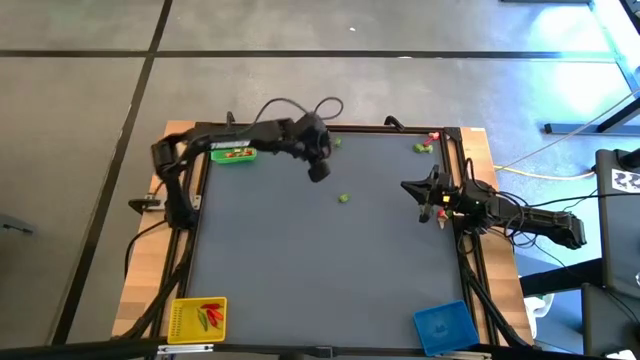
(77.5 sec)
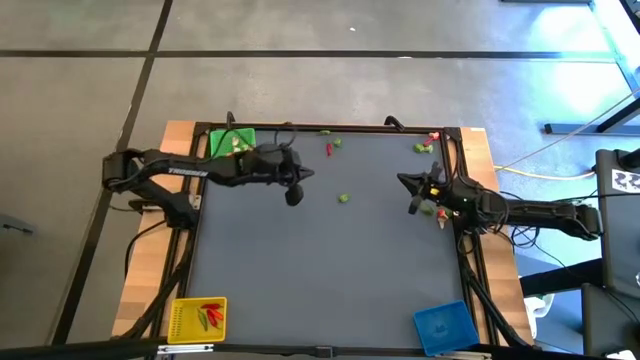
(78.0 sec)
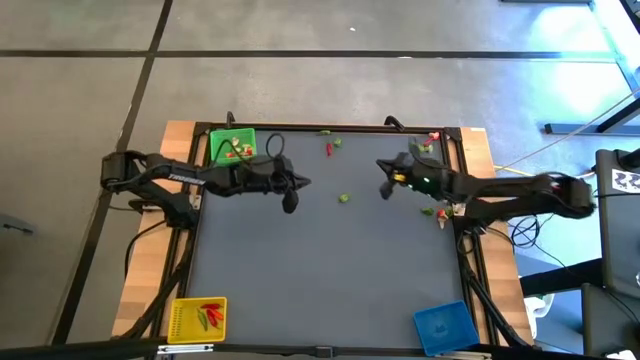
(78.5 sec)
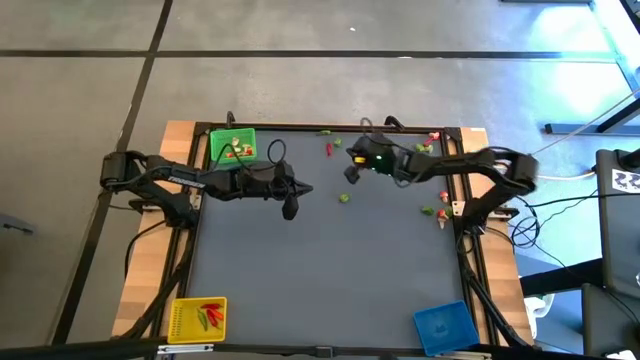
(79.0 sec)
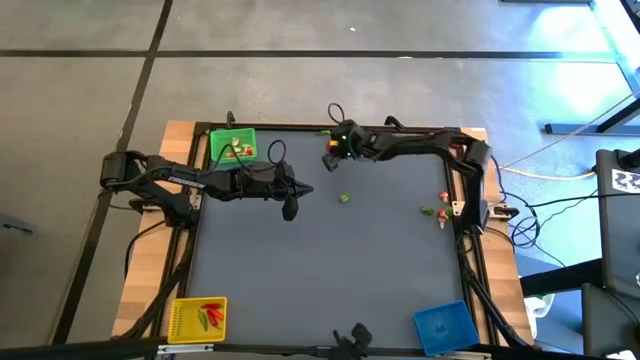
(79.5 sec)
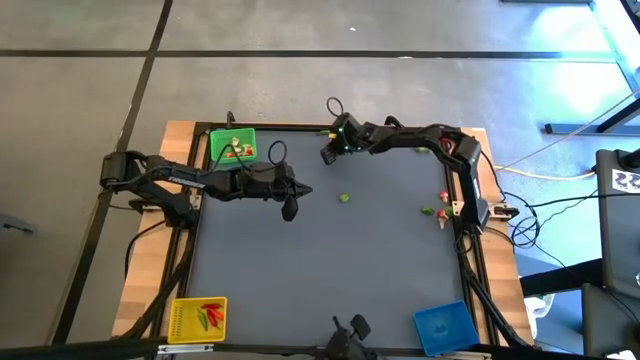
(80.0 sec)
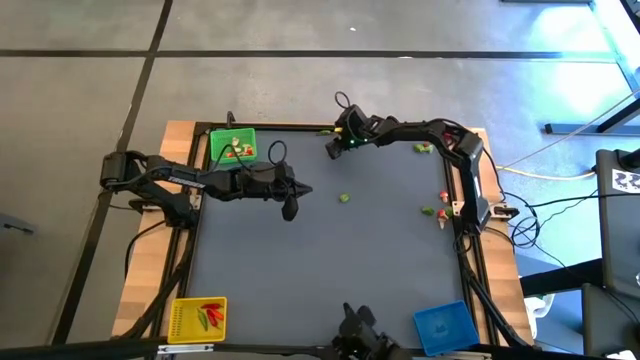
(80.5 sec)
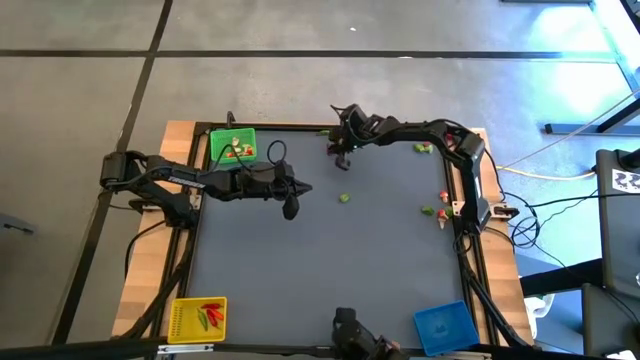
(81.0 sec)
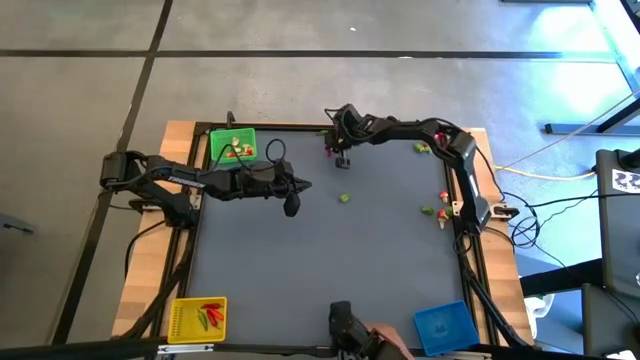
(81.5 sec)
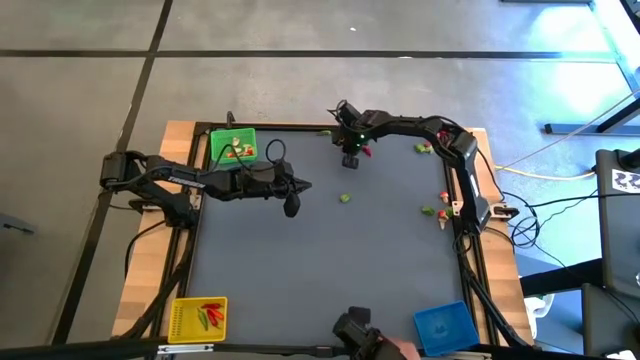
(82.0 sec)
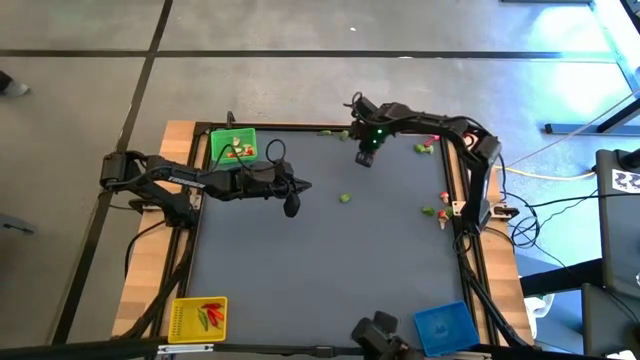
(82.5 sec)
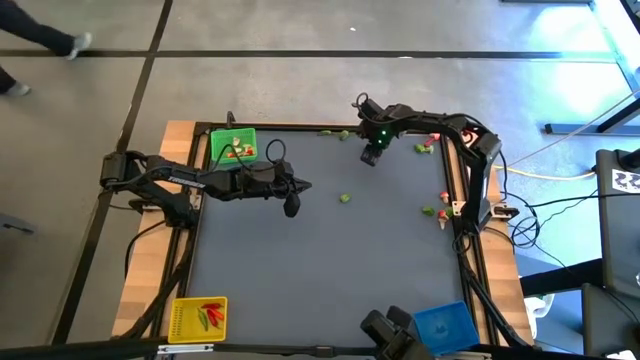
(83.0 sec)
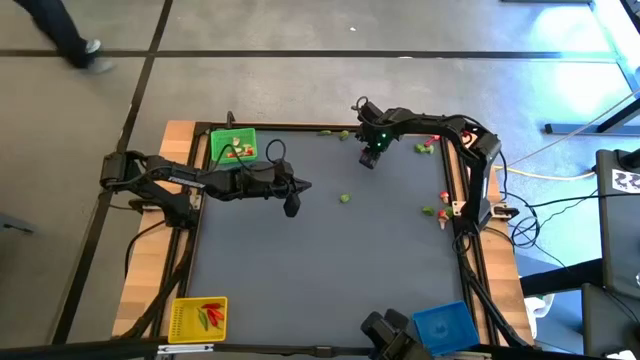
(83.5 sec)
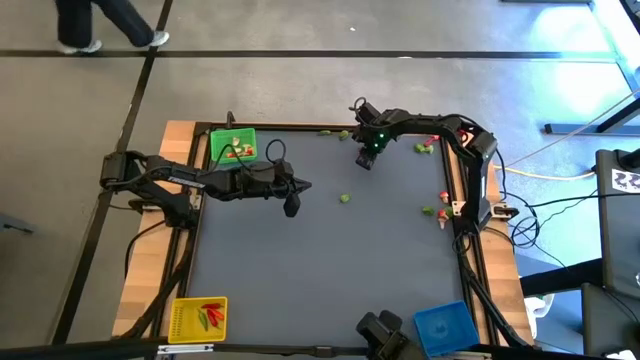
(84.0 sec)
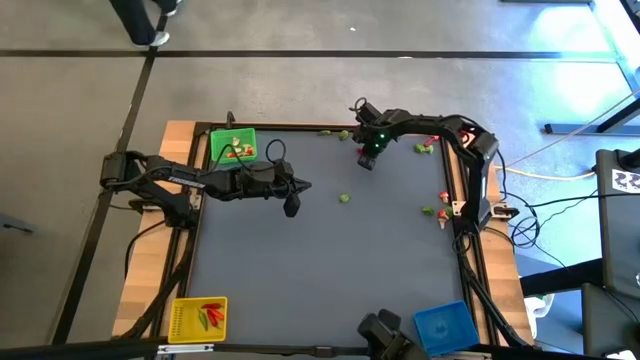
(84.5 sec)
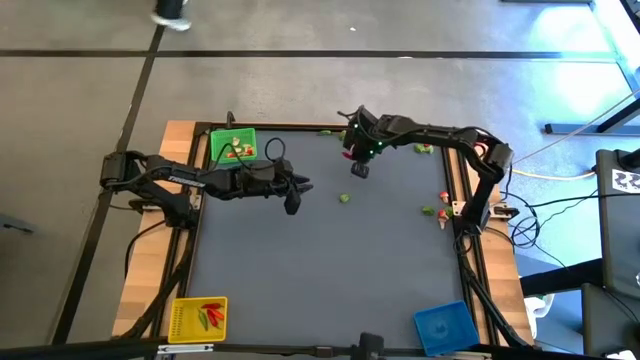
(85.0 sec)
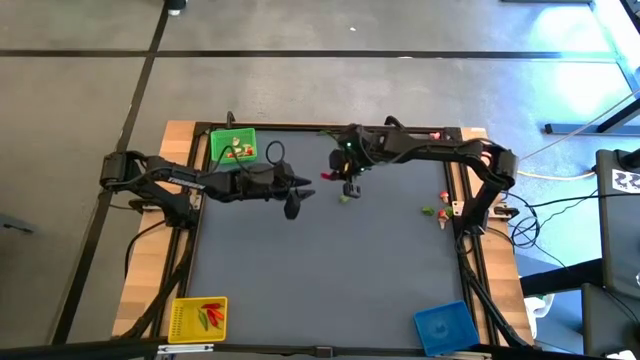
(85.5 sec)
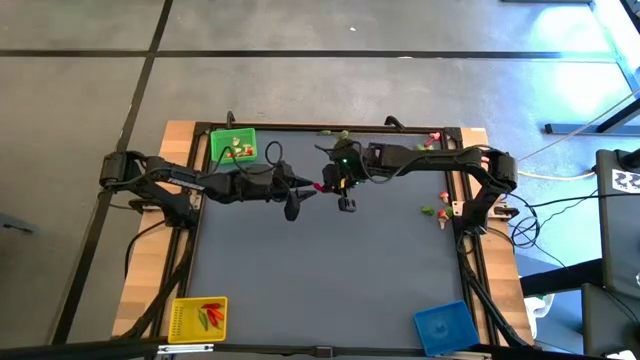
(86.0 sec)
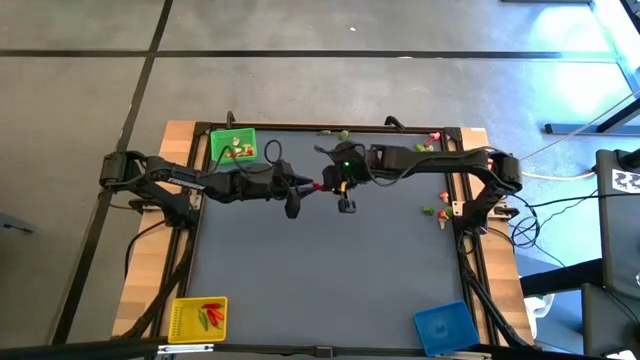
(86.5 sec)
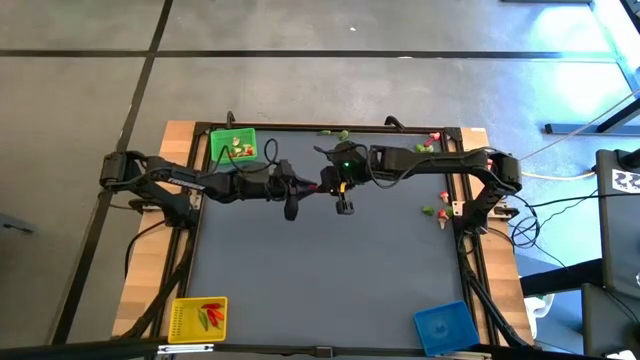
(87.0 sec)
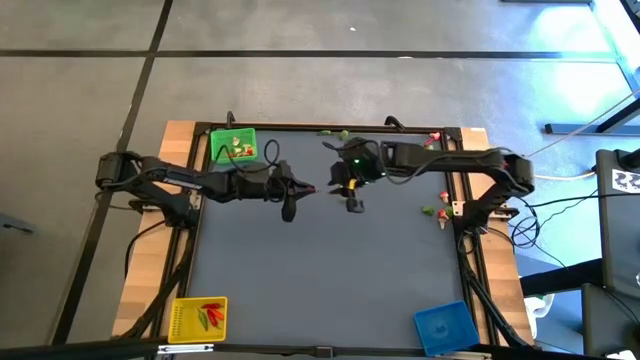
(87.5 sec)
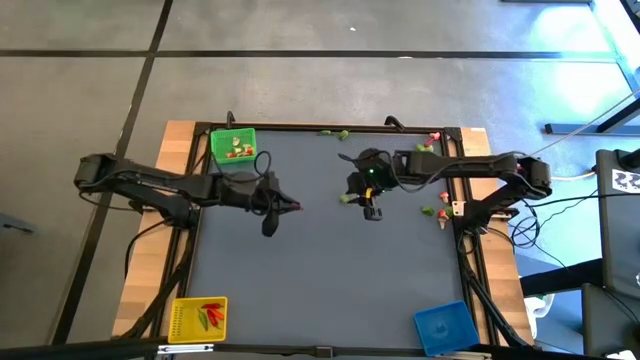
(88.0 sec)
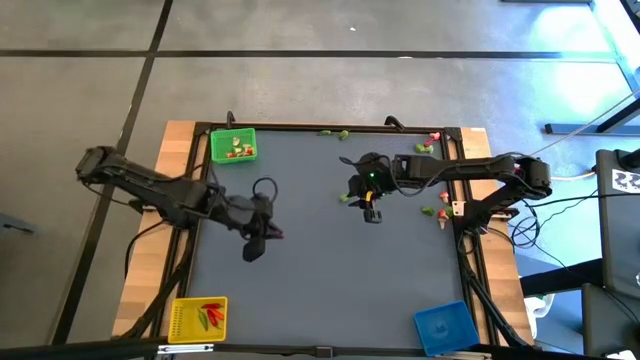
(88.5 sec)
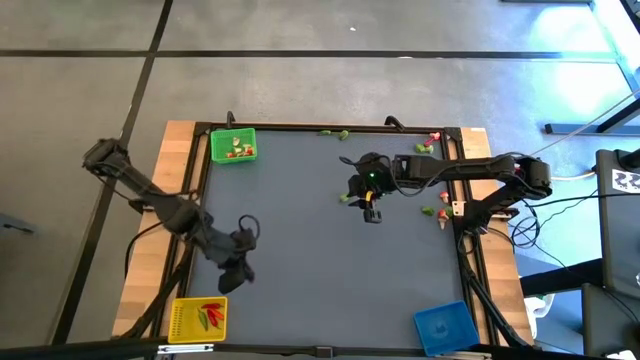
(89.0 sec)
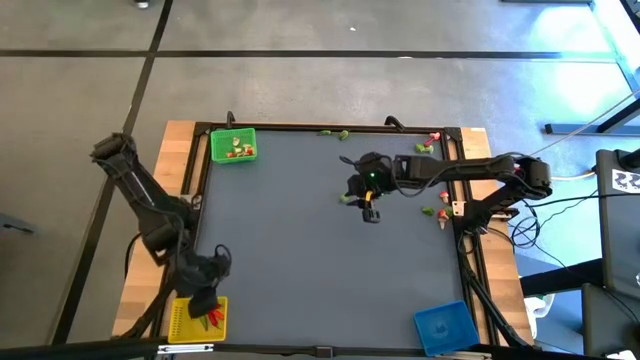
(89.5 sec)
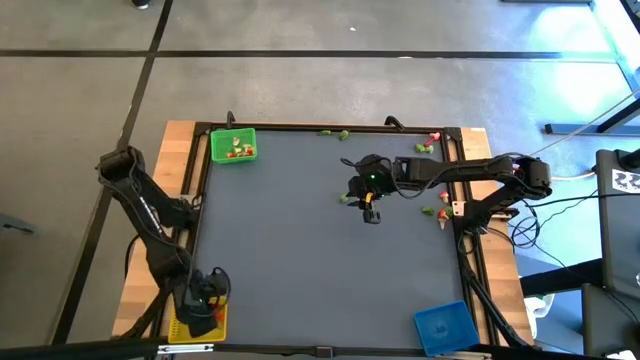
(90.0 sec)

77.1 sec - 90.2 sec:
Task: Sort produce into baskets
Put the red chili pepper into the yellow bin

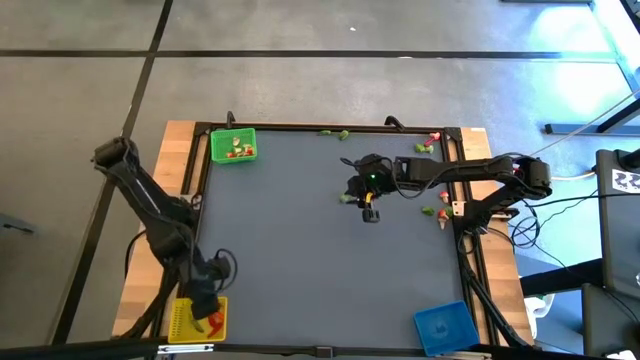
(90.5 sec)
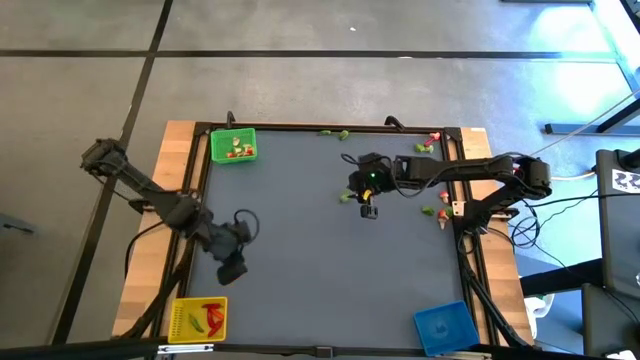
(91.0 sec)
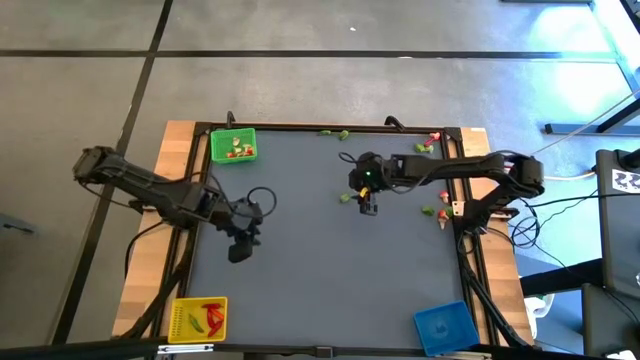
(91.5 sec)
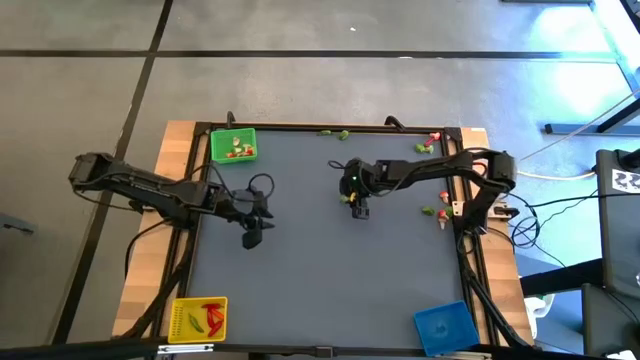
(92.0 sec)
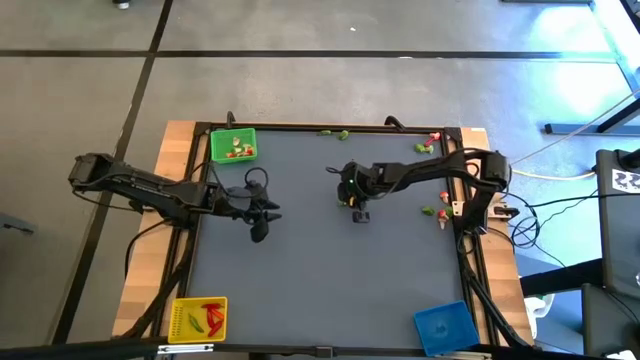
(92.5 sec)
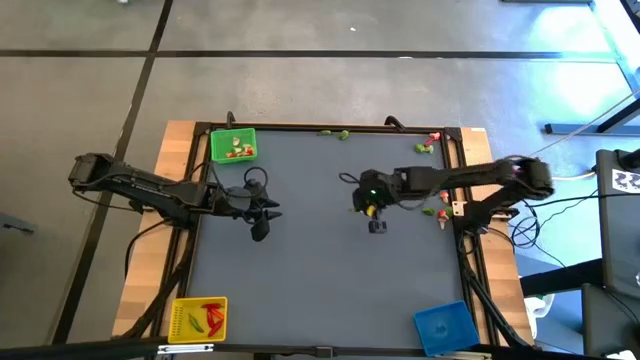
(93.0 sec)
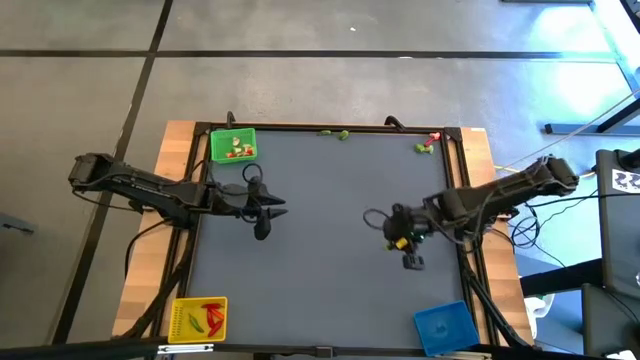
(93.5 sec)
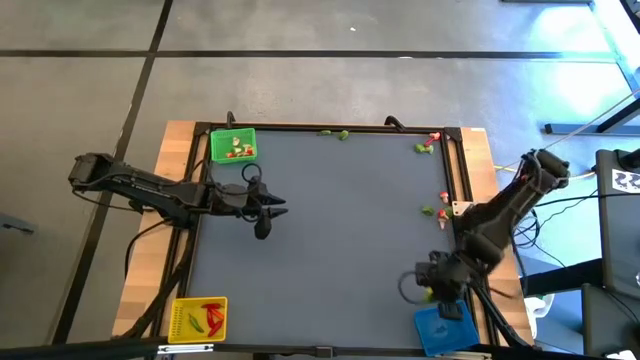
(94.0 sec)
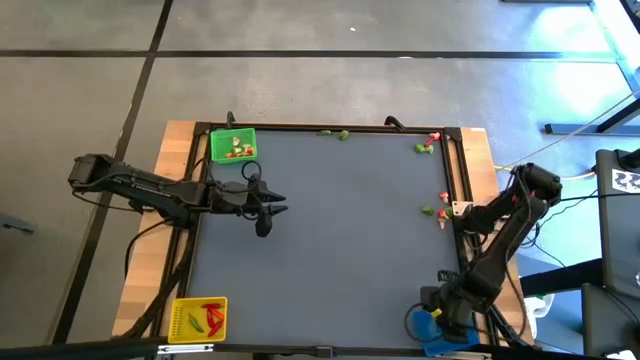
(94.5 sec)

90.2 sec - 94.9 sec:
Put the green chili pepper into the blue bin

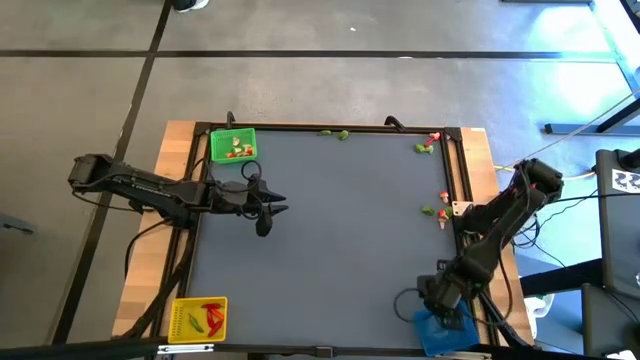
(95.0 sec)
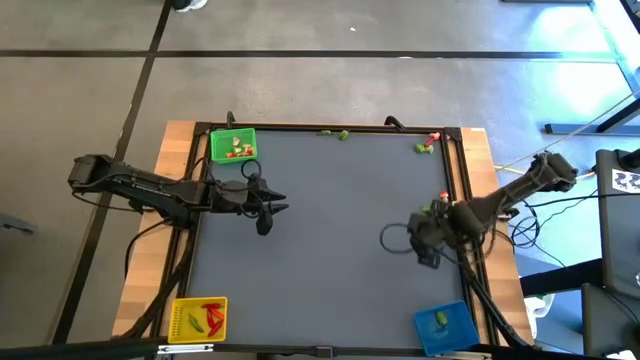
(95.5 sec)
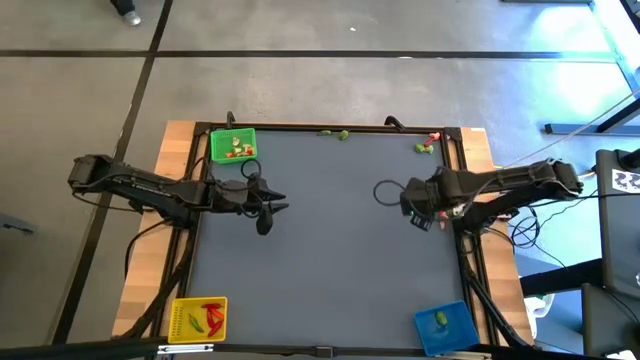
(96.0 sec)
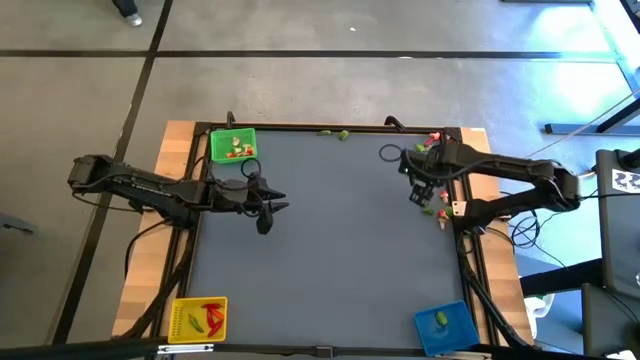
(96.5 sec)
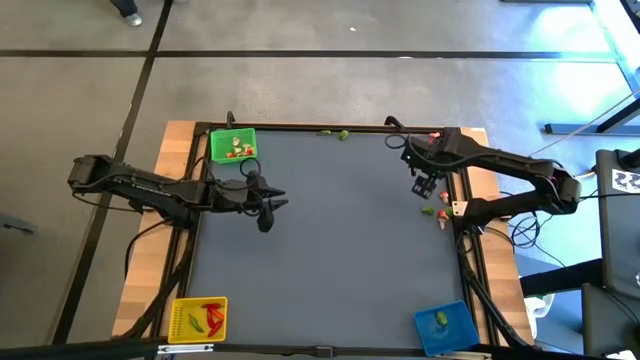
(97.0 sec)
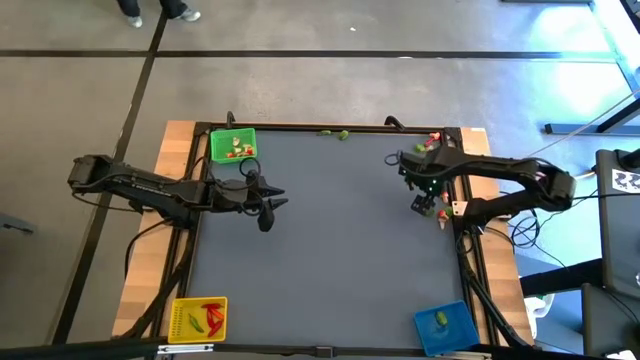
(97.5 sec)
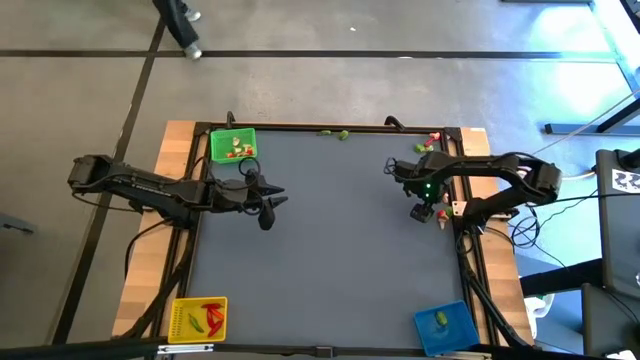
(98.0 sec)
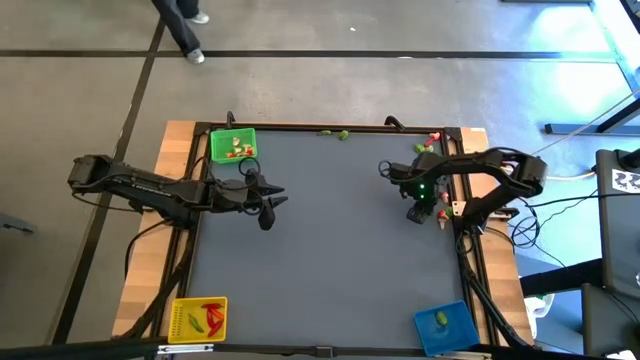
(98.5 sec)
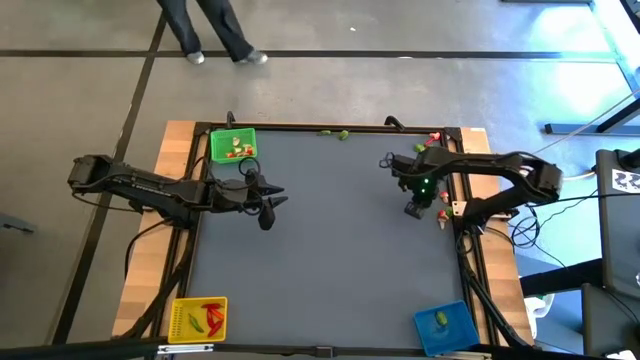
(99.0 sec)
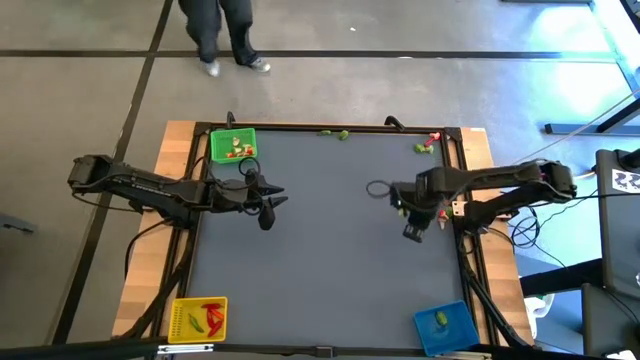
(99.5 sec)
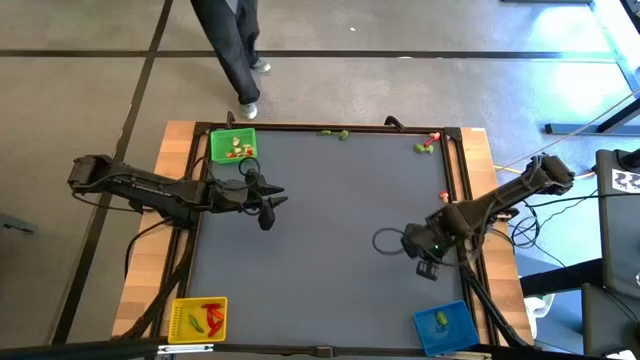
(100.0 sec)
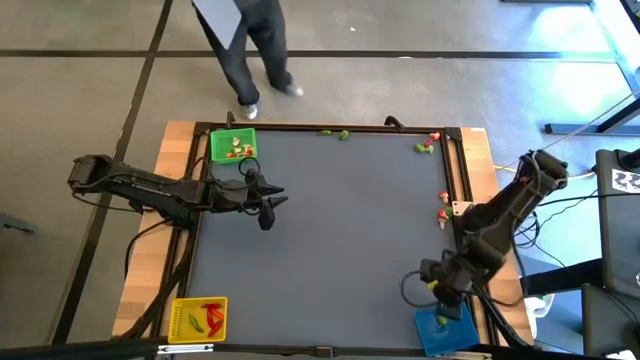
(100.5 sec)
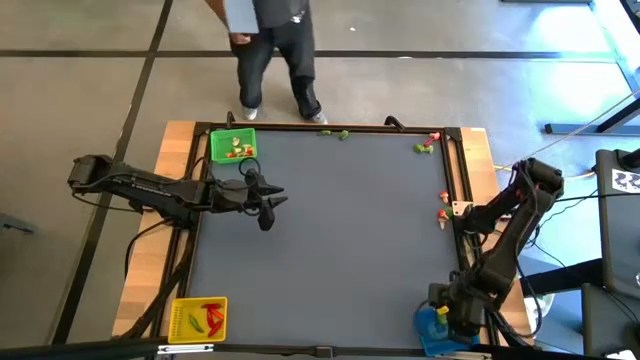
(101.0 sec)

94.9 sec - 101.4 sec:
Put the green chili pepper into the blue bin
